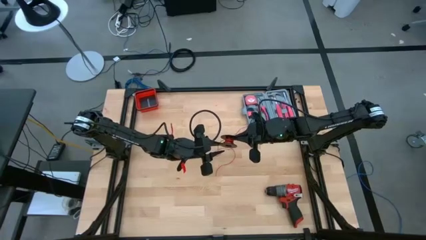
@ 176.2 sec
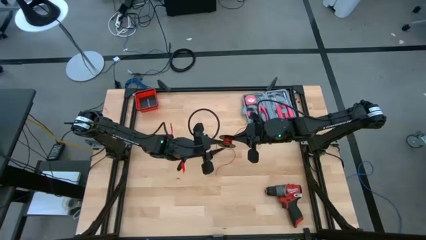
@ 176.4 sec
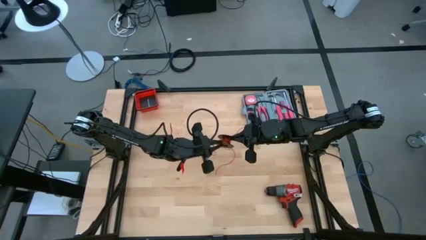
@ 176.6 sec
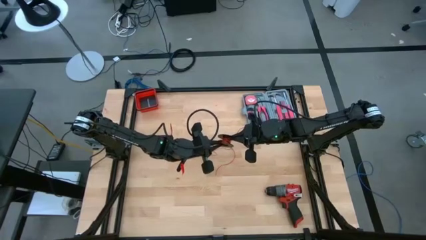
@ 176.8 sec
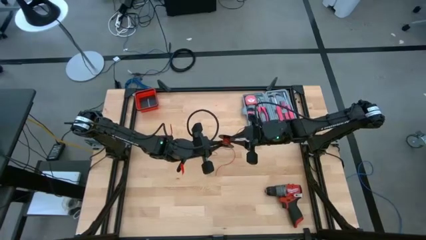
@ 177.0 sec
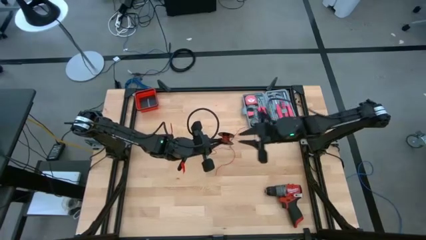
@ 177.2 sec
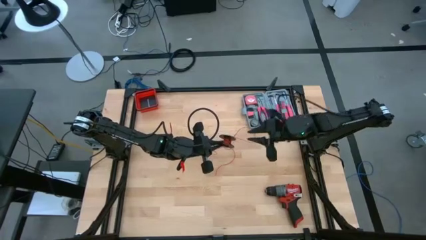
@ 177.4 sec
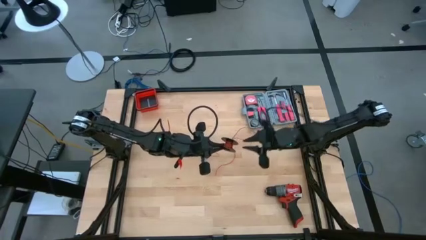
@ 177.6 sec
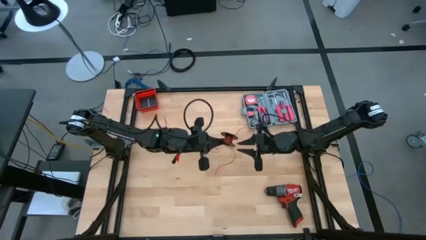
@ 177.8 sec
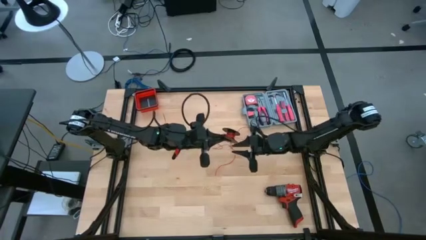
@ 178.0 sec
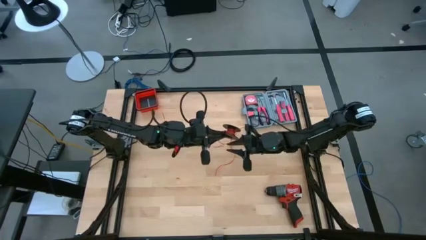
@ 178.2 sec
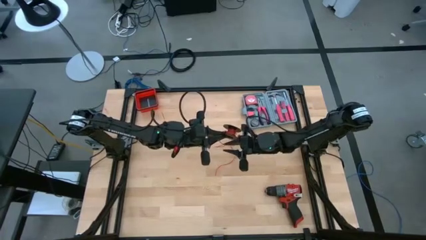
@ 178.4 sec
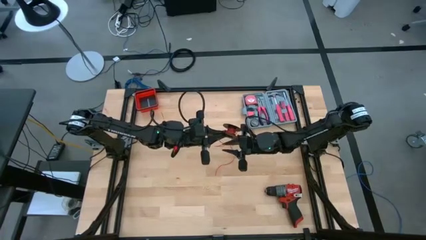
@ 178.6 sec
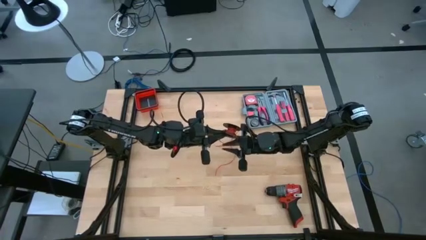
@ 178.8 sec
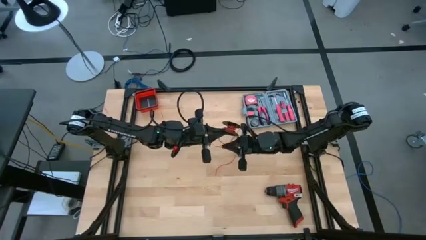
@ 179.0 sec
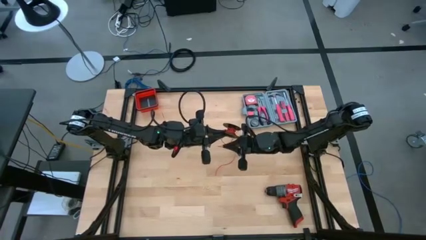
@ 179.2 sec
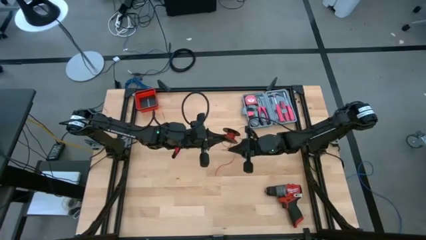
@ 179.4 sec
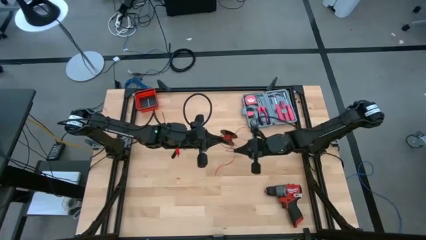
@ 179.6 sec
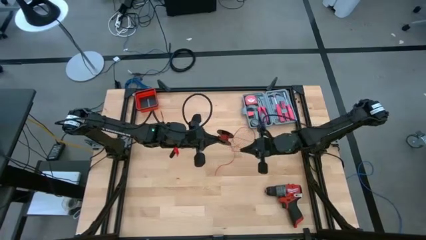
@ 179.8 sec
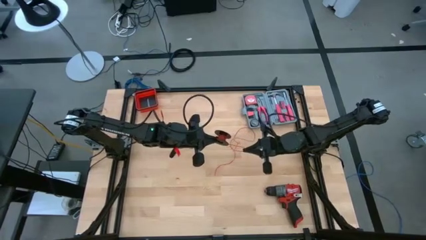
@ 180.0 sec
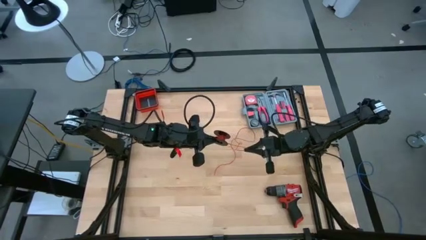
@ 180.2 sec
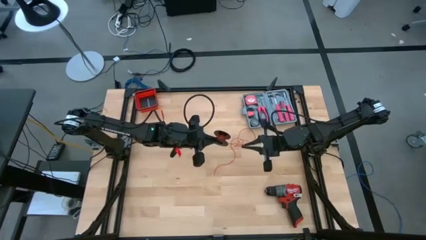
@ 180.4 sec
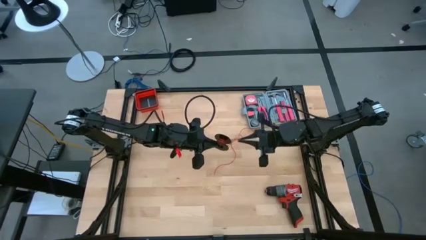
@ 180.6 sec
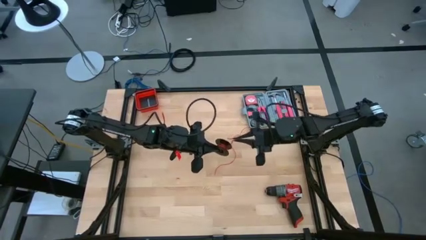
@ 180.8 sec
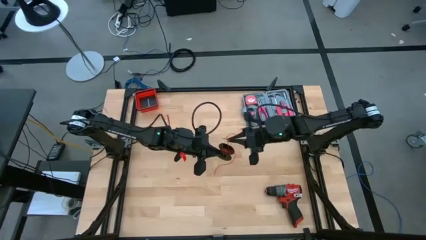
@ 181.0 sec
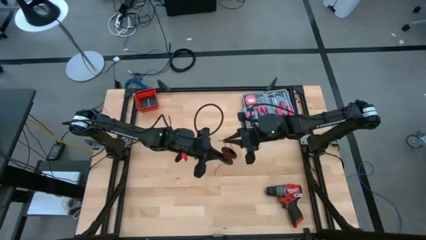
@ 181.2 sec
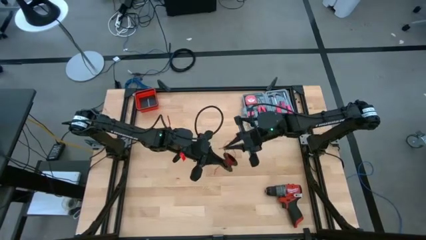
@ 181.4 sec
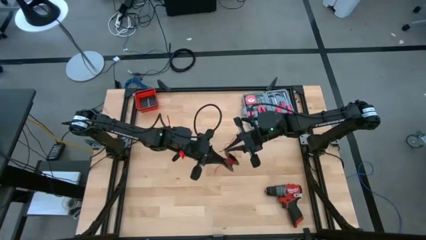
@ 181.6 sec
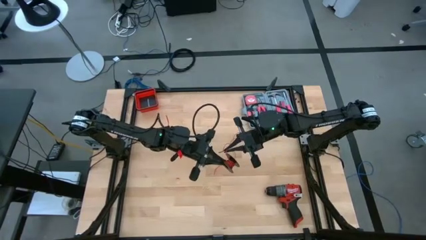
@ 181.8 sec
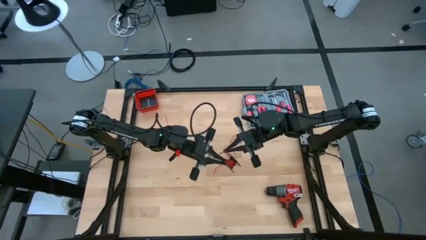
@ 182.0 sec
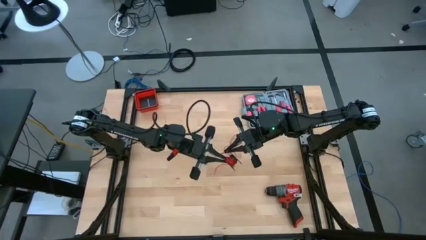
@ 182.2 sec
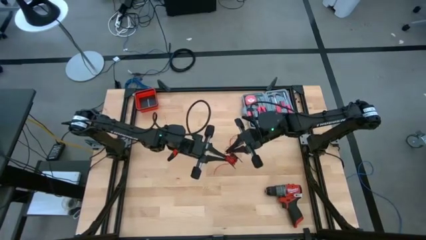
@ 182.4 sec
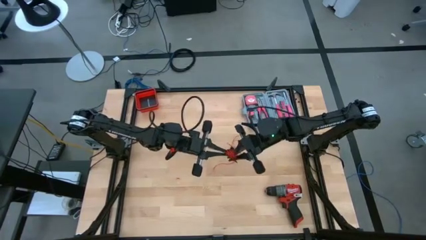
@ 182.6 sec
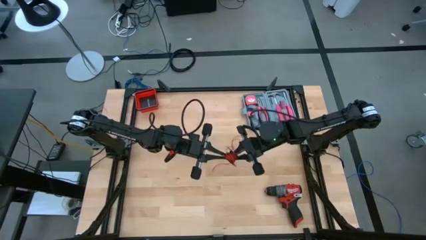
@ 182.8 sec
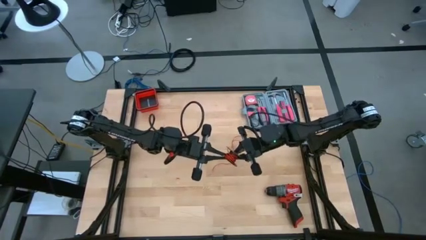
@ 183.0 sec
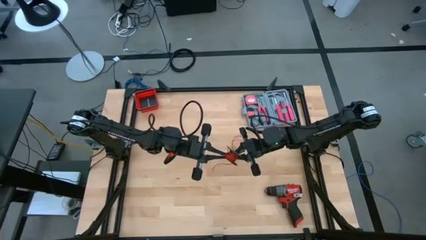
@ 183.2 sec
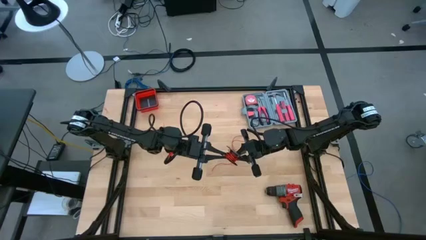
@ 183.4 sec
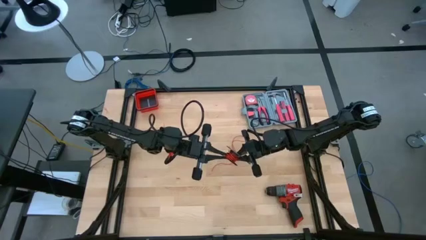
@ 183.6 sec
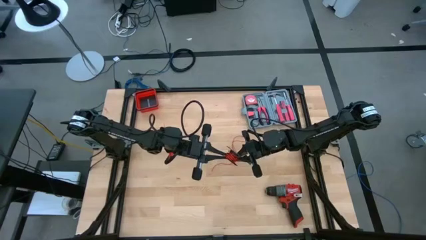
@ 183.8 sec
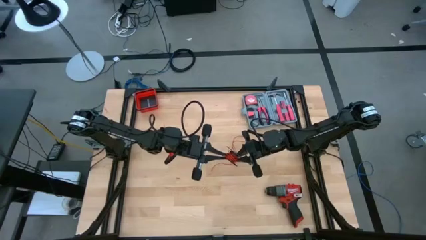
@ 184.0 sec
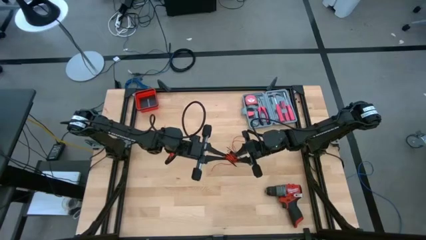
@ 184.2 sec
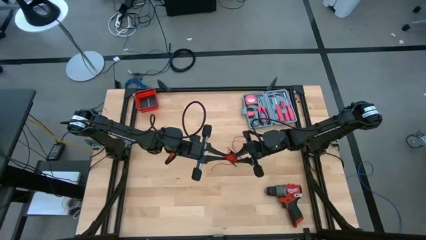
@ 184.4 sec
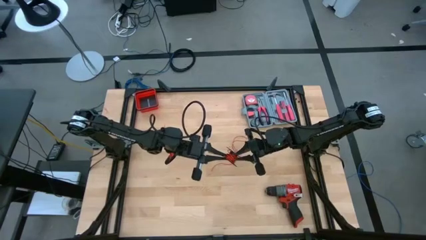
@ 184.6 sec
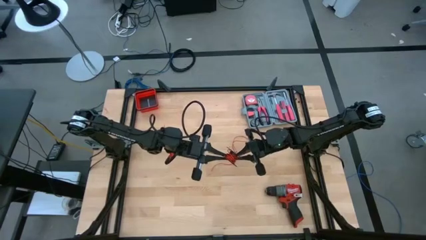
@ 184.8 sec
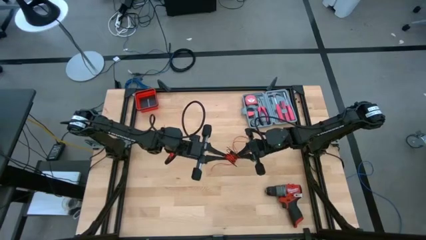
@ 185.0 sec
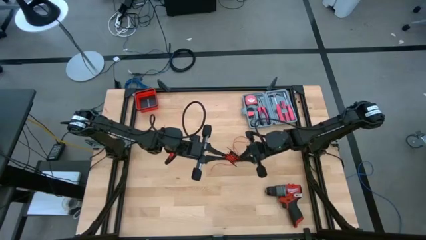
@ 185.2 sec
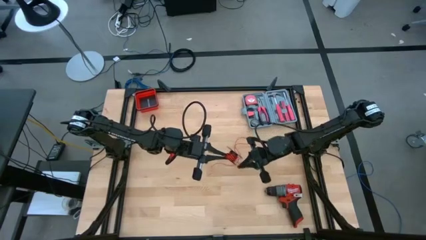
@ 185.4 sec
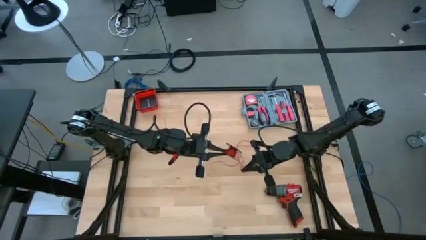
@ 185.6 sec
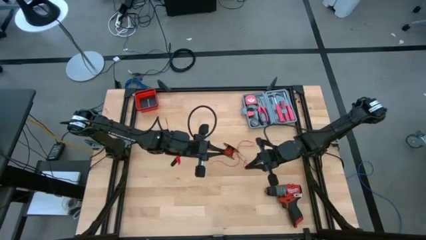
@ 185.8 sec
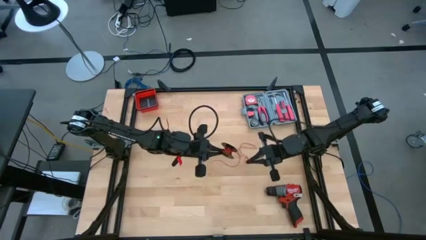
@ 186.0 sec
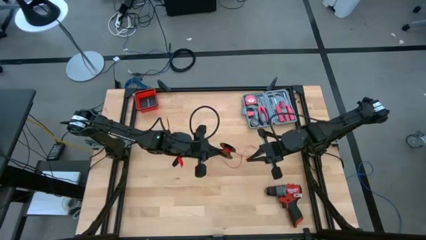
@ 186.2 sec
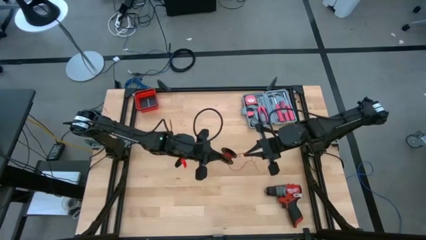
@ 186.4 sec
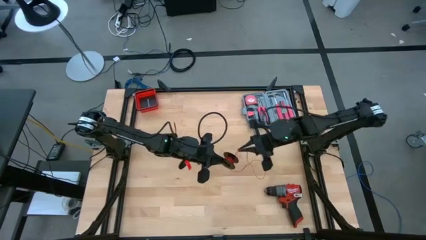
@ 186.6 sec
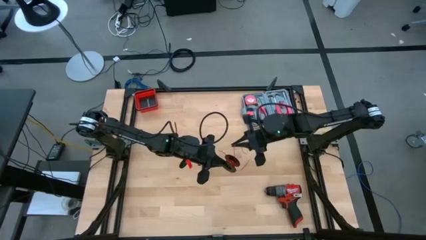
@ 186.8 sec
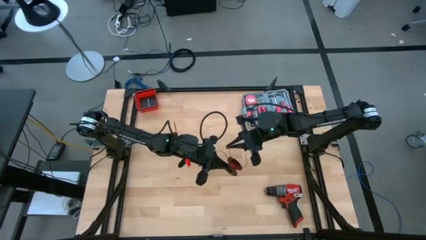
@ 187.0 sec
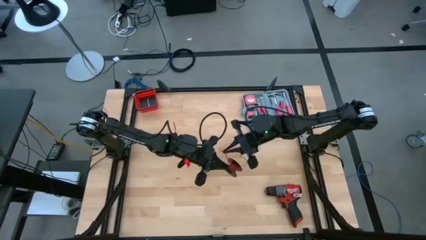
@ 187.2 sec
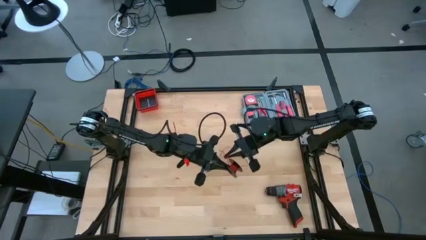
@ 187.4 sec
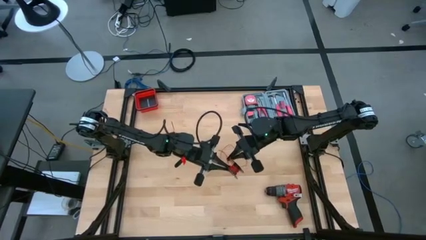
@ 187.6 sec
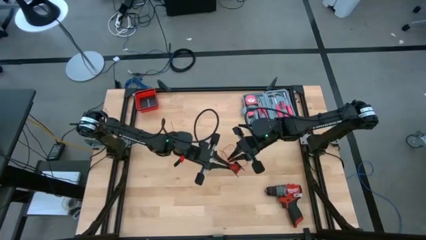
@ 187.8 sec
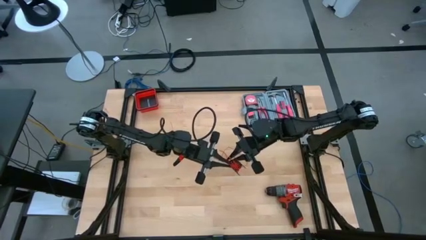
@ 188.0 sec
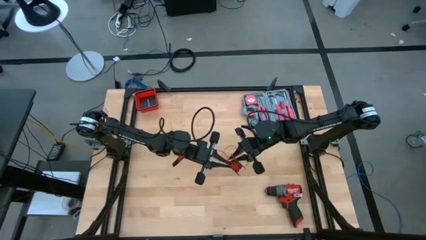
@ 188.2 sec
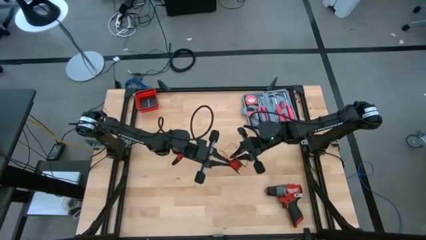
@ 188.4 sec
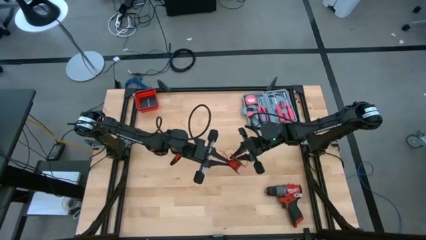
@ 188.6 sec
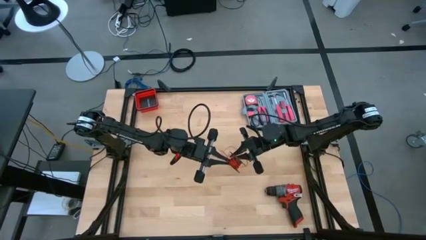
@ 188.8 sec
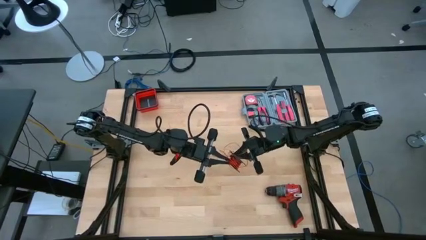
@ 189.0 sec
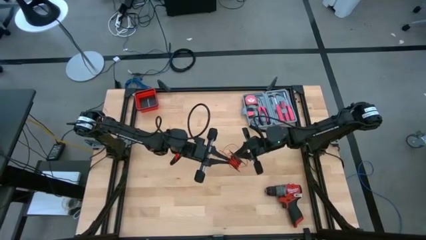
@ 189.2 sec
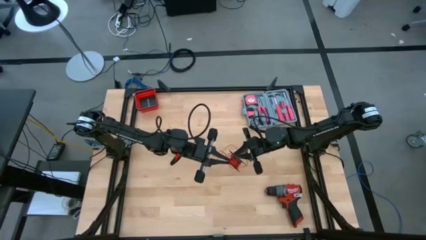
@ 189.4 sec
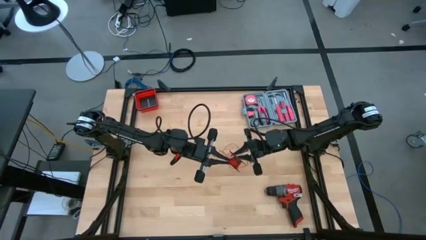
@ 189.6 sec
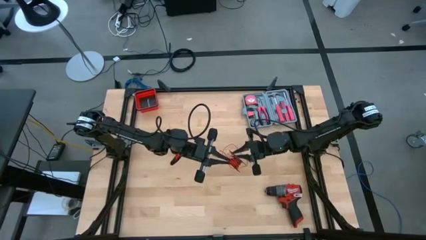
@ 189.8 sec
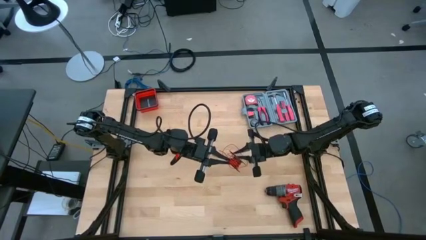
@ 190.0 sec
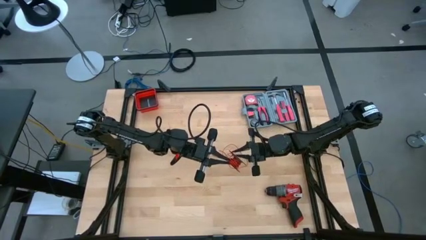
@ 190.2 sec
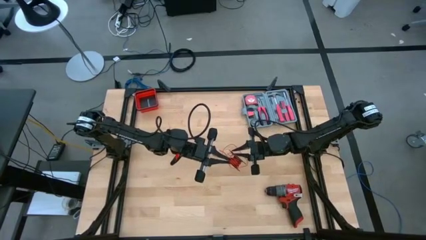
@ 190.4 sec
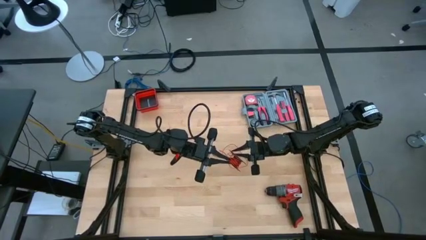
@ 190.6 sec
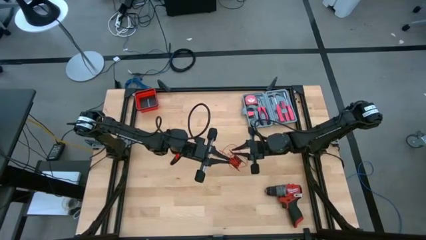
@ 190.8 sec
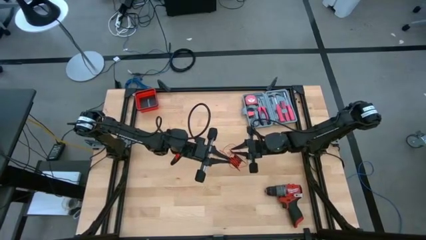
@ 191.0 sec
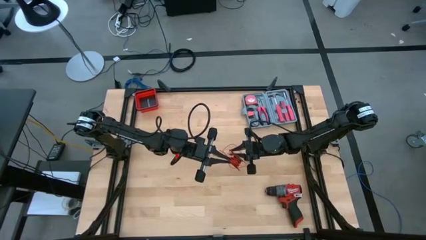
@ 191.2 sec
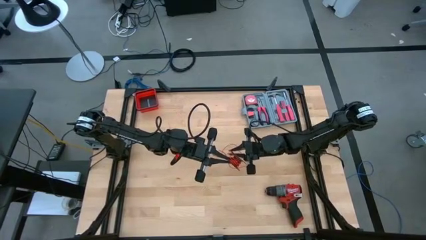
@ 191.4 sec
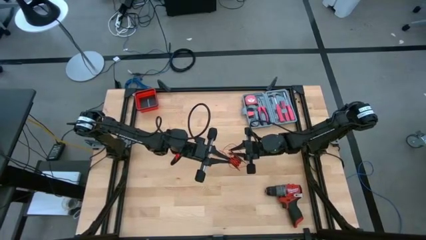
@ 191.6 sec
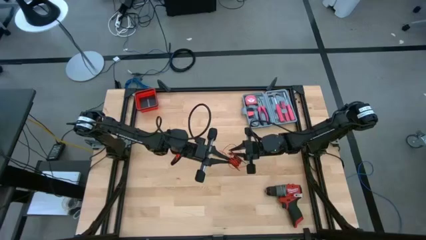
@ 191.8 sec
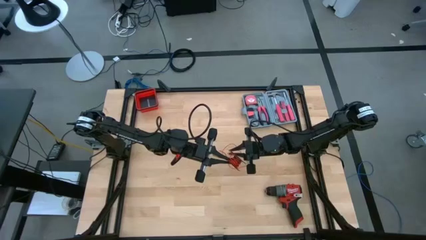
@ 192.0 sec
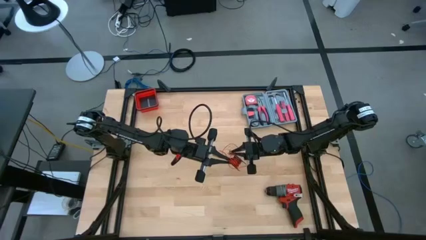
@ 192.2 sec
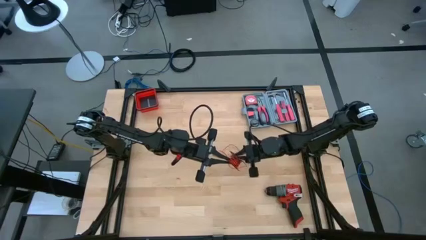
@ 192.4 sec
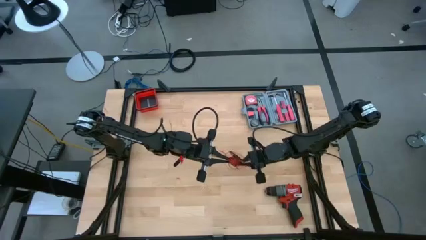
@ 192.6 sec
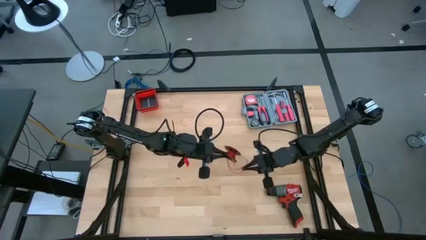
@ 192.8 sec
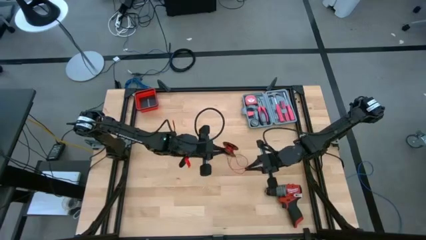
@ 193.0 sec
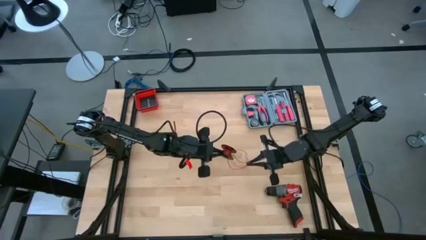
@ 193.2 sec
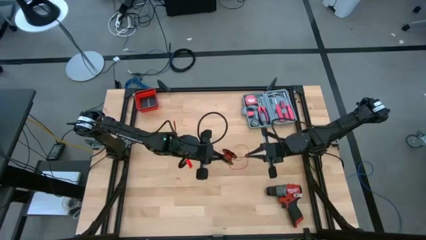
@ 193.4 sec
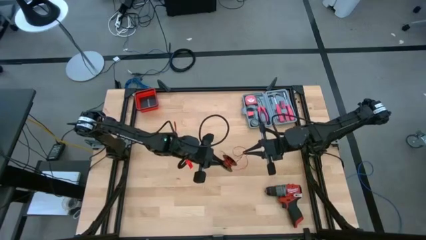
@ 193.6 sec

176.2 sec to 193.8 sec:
Task: Coil cords
Coil the red wire onto the black spool
